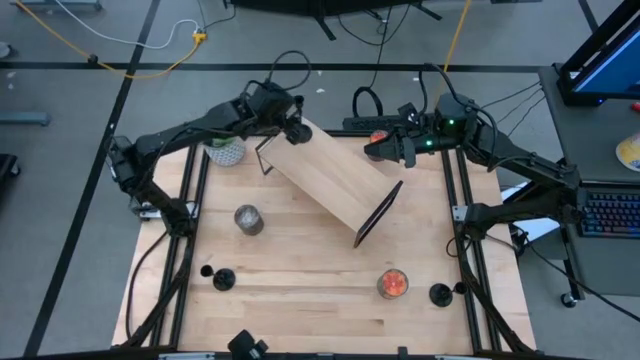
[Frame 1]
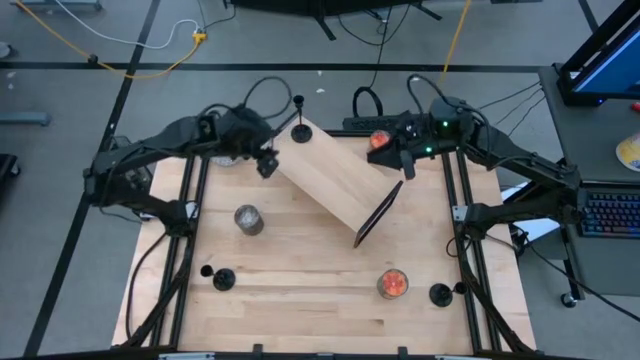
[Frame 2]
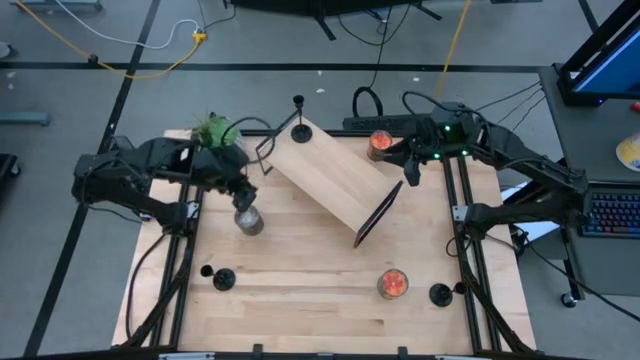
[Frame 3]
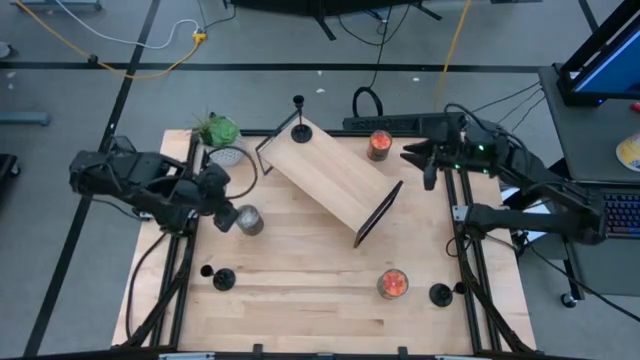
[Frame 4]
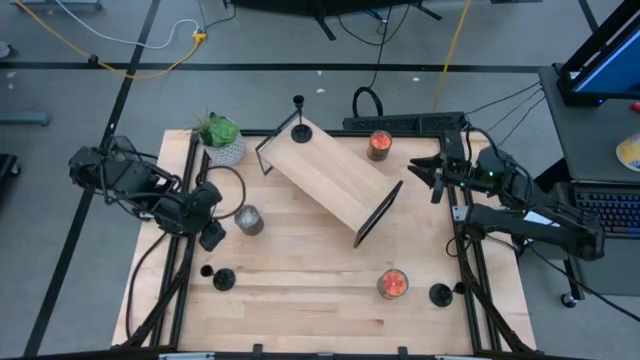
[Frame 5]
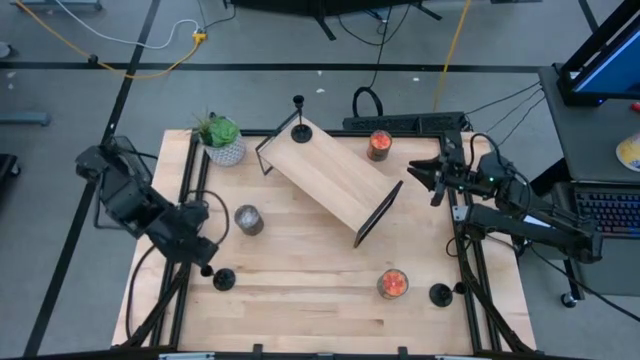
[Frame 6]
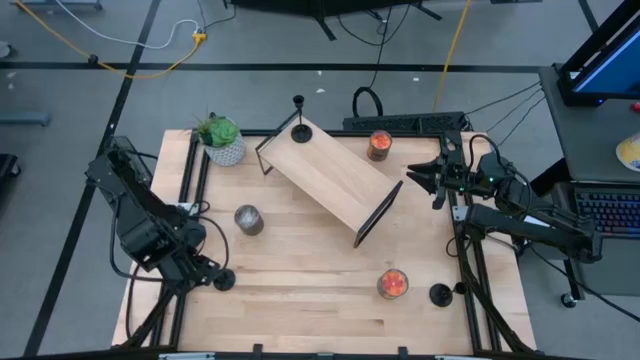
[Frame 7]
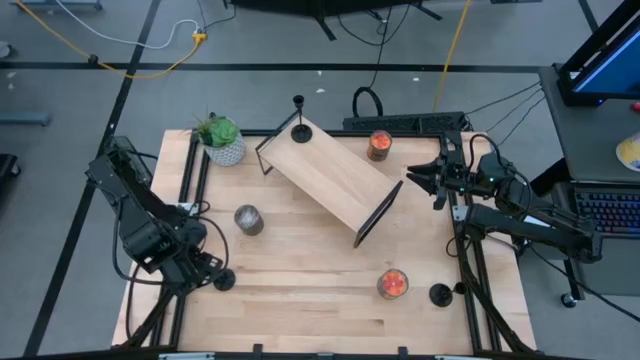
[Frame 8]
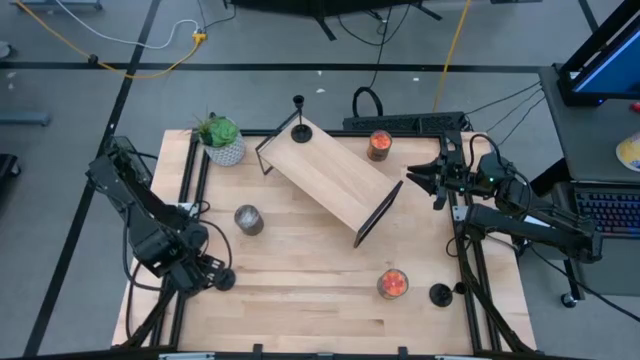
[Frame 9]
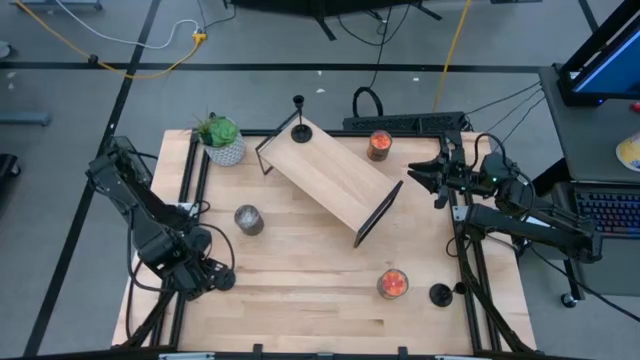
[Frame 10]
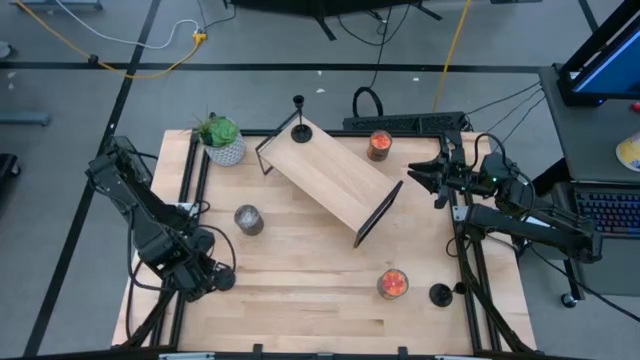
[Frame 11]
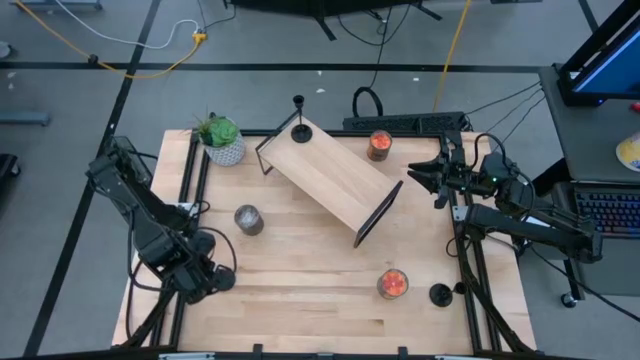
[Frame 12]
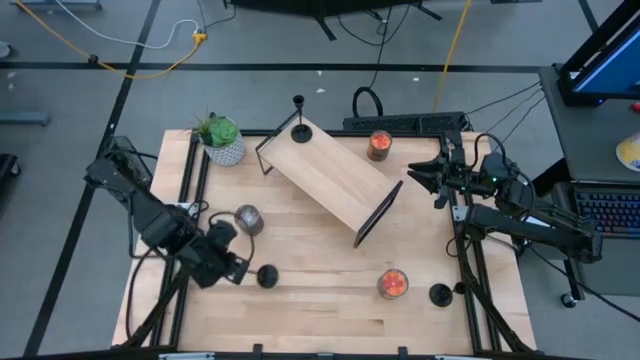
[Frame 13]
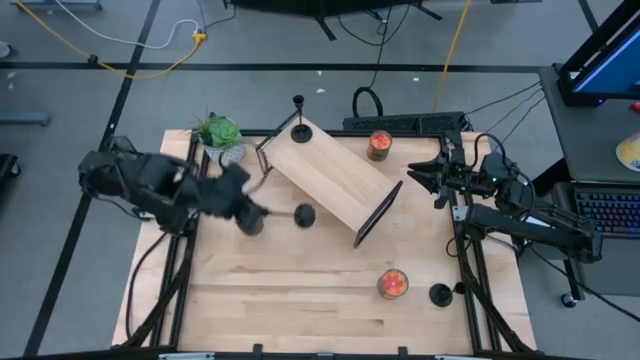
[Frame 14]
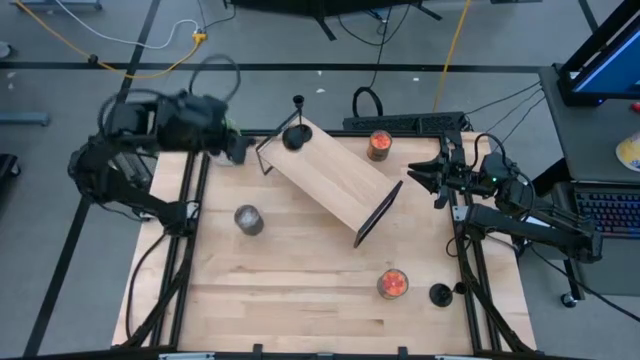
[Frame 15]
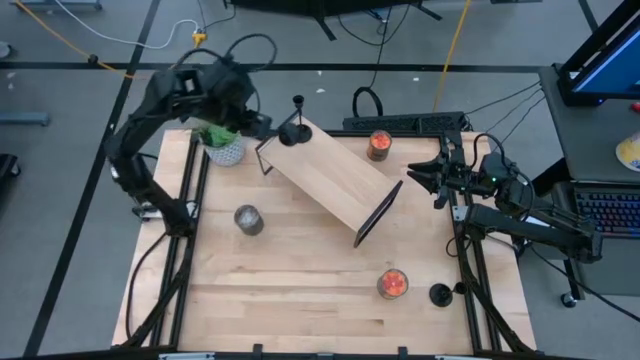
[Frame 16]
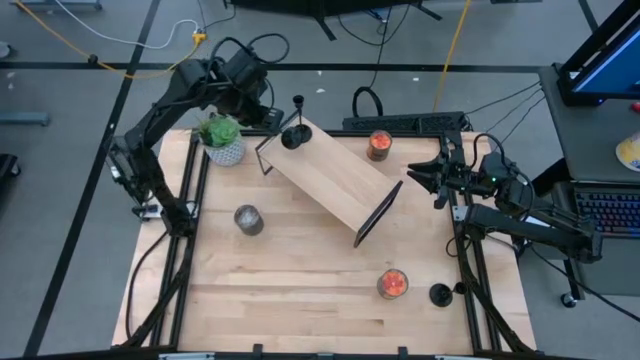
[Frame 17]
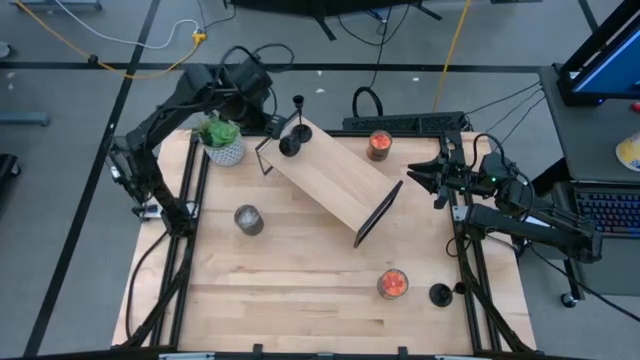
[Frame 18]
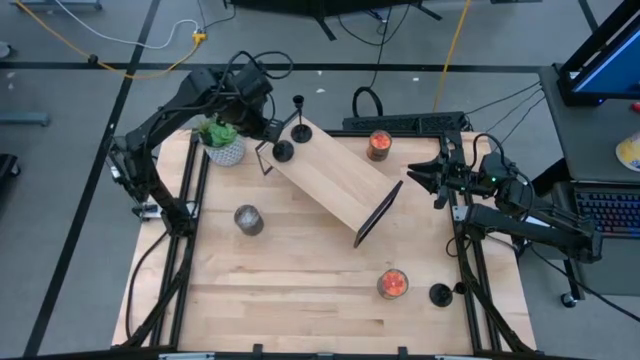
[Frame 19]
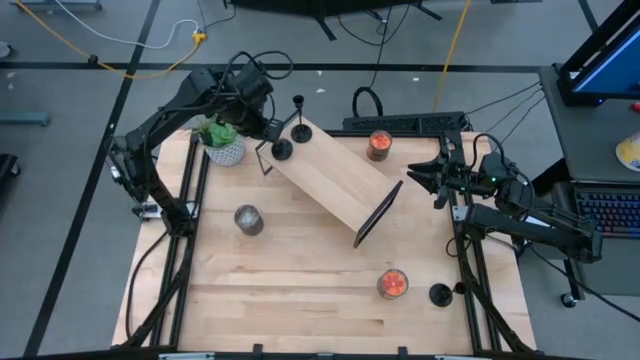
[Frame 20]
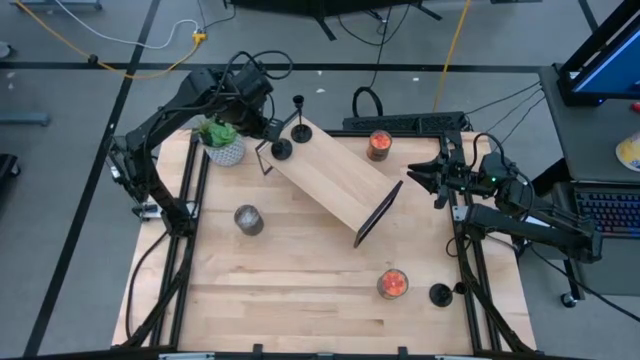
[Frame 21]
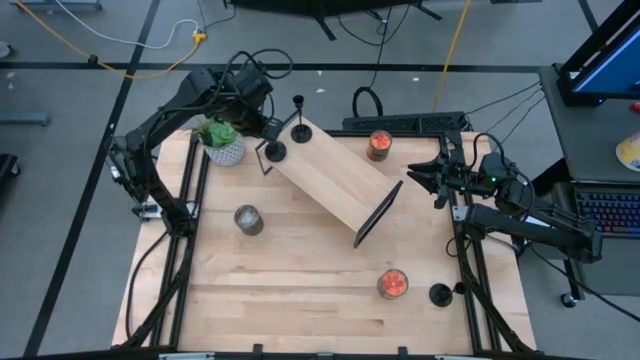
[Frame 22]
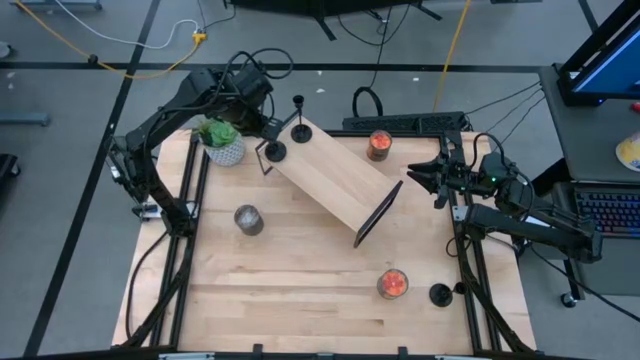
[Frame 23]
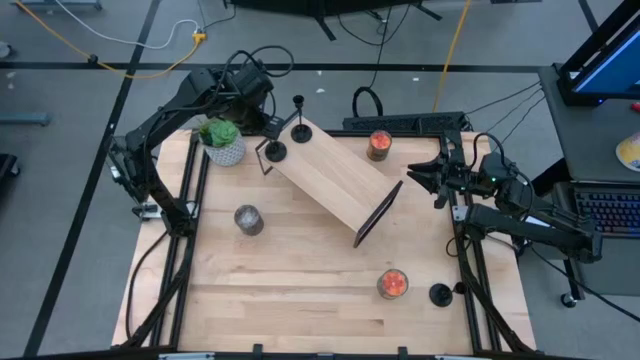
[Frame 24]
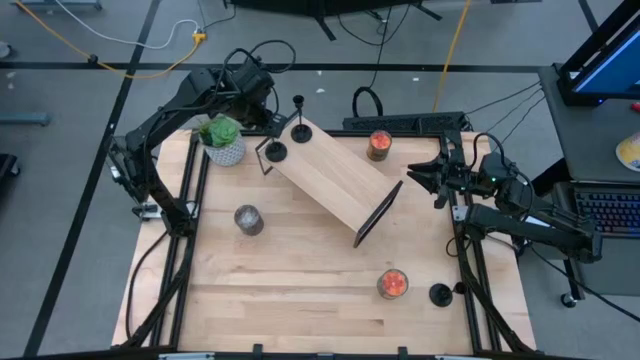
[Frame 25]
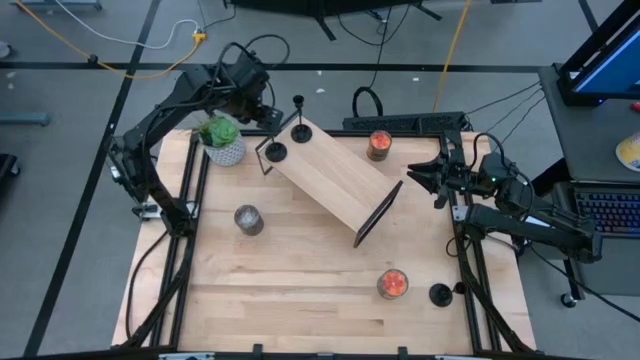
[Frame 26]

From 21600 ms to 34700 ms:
Task: Pick & Place candle stick holders
Put the left candle holder on the shelf

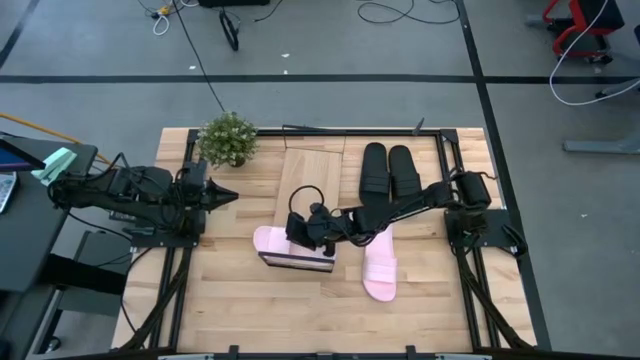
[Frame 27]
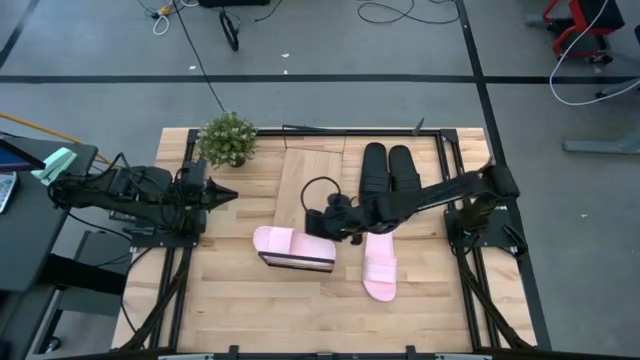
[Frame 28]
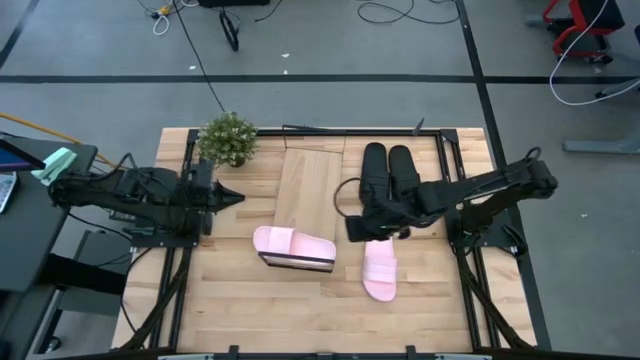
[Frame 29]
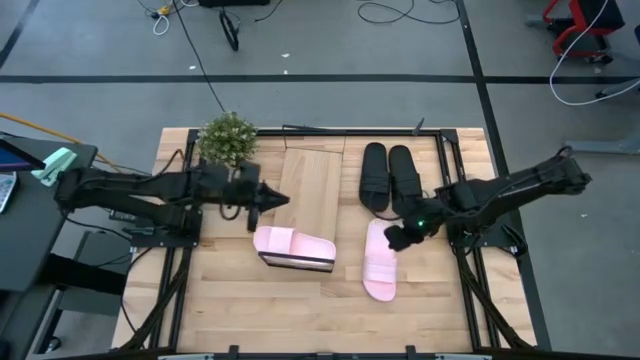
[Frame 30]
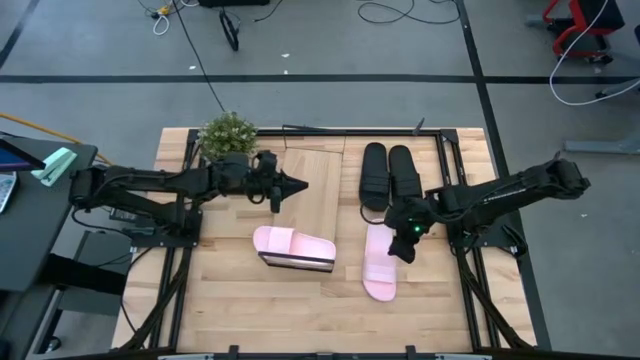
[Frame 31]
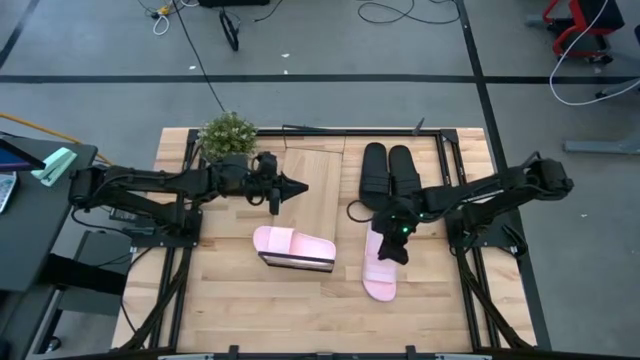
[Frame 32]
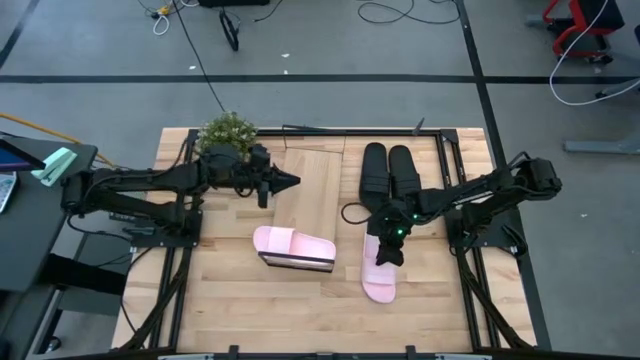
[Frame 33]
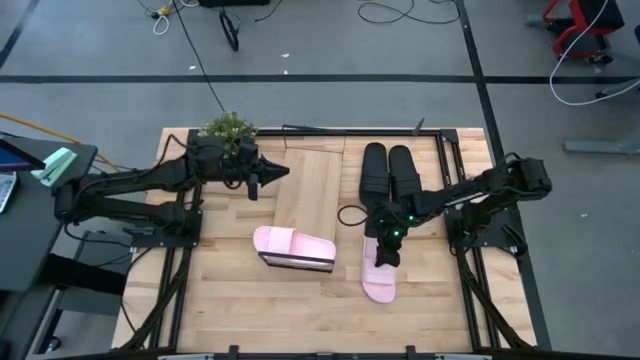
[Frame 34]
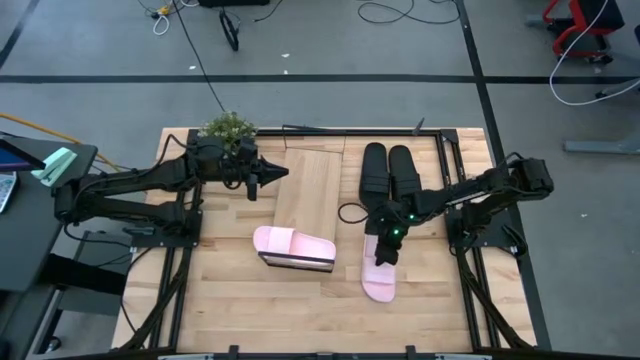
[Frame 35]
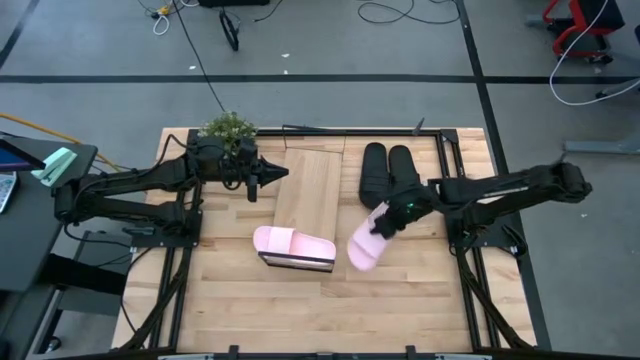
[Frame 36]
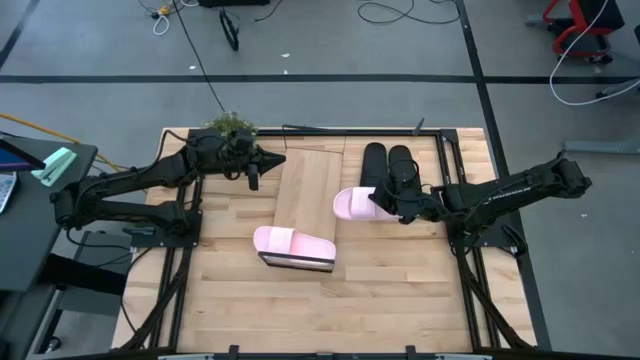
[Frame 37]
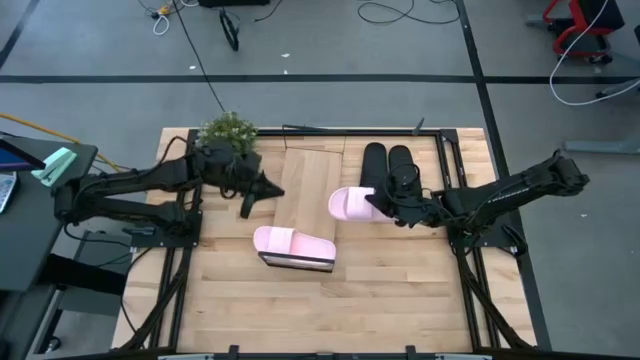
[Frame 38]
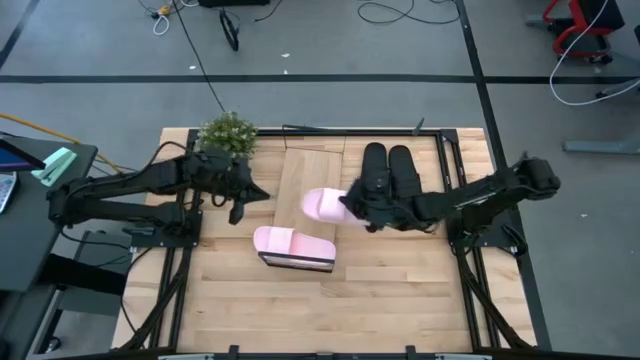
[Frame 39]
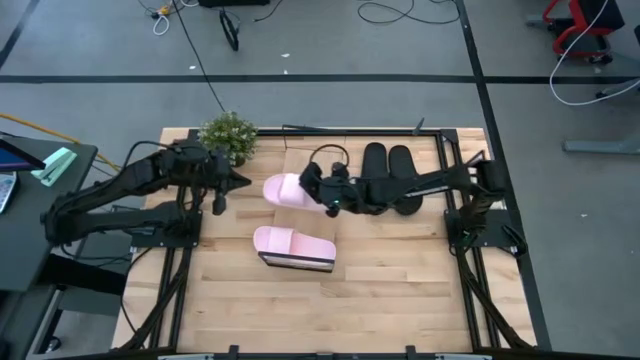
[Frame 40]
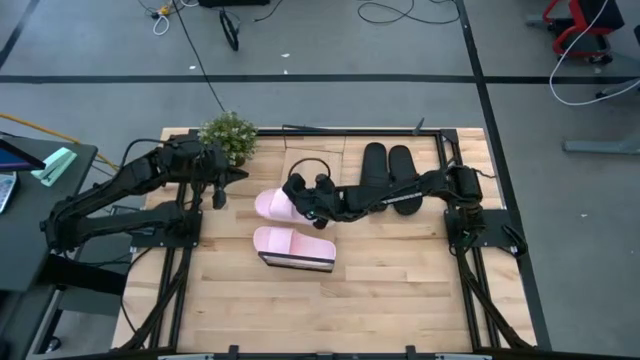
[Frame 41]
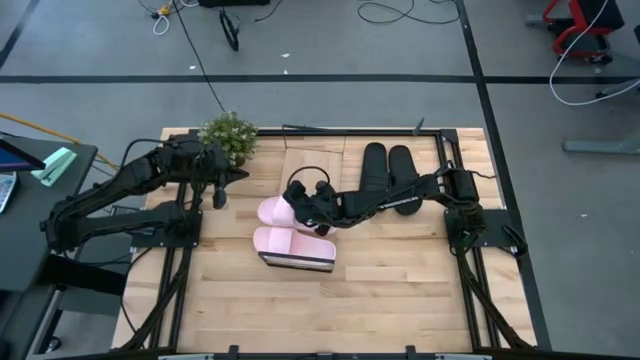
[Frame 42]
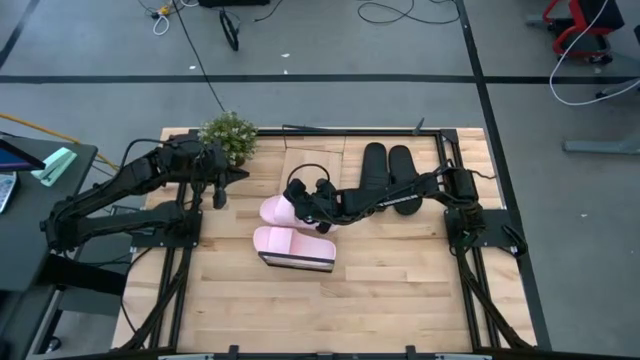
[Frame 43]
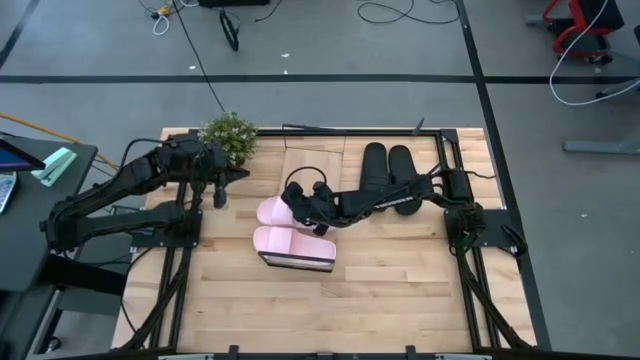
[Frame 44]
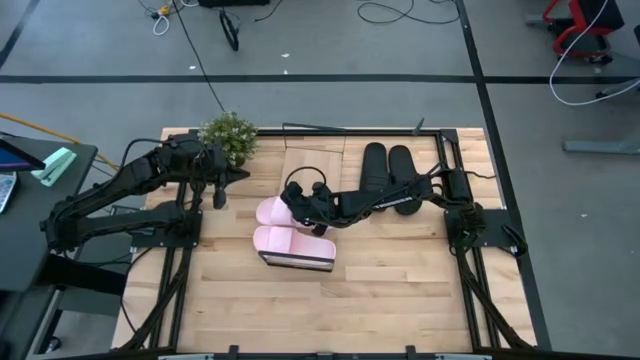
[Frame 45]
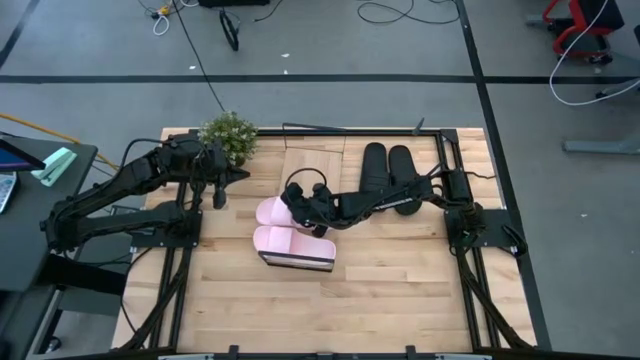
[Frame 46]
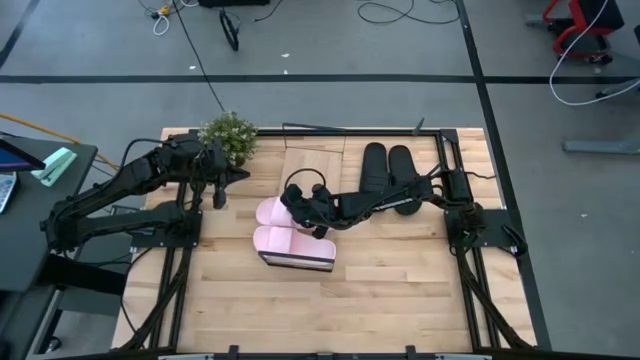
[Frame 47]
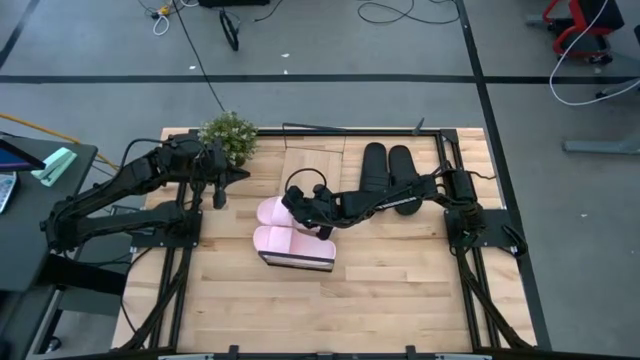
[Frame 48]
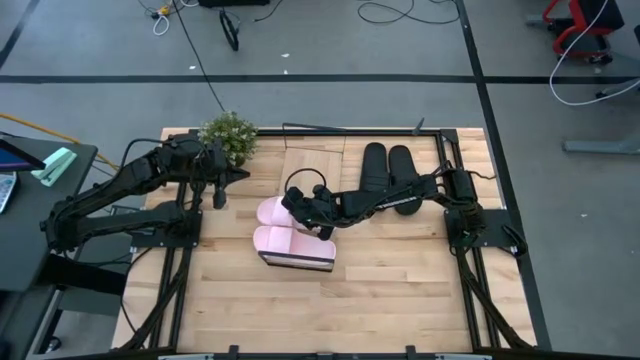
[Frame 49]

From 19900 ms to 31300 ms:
Task: Pick and place slides into the shelf
Put the pink slides on the shelf
